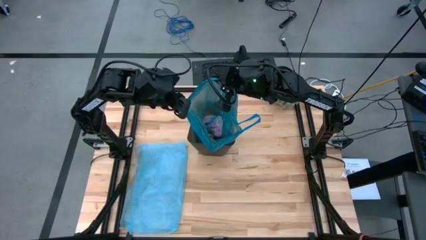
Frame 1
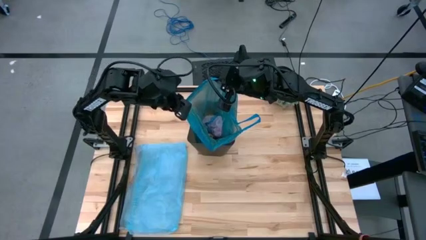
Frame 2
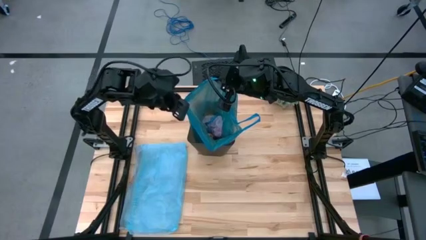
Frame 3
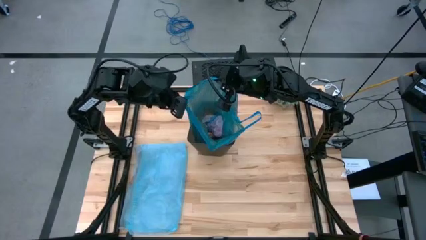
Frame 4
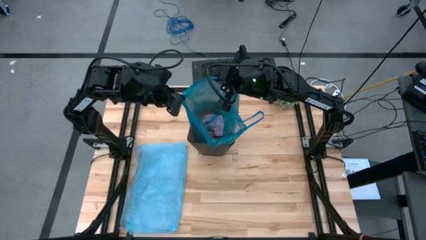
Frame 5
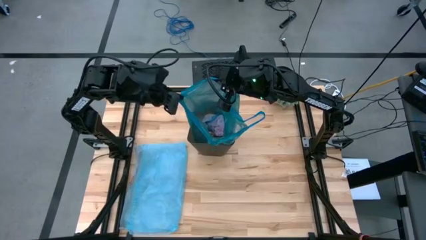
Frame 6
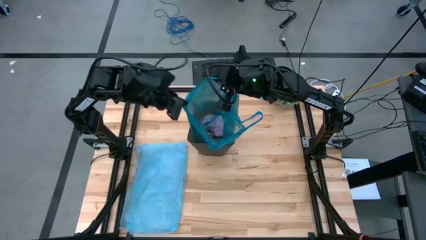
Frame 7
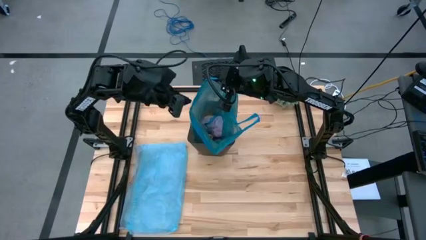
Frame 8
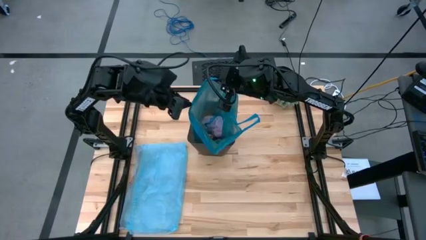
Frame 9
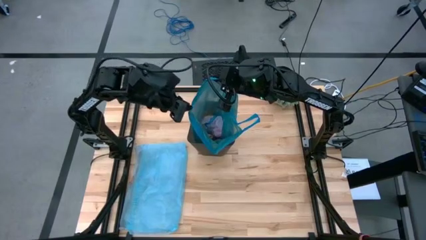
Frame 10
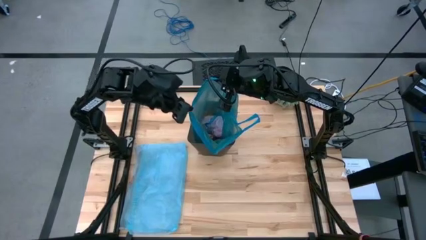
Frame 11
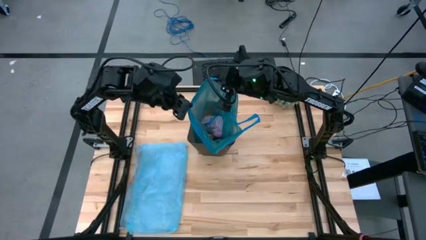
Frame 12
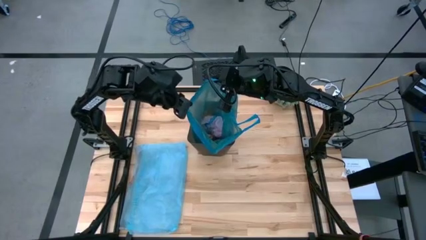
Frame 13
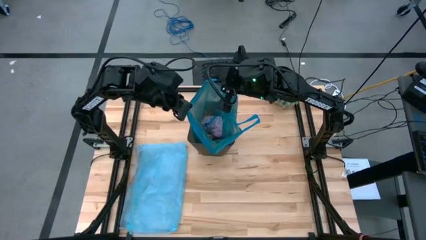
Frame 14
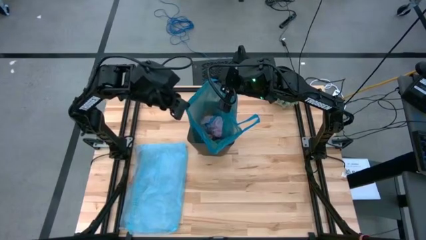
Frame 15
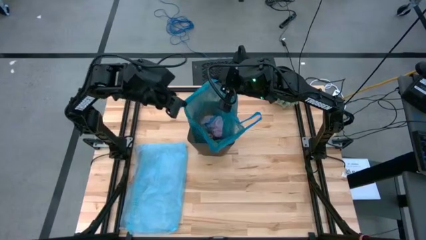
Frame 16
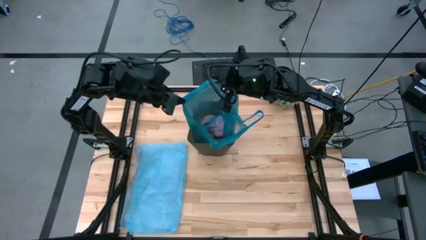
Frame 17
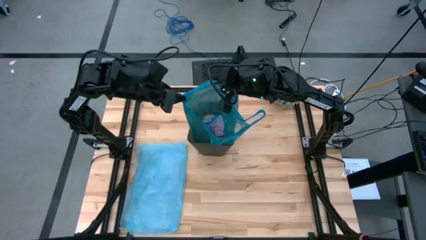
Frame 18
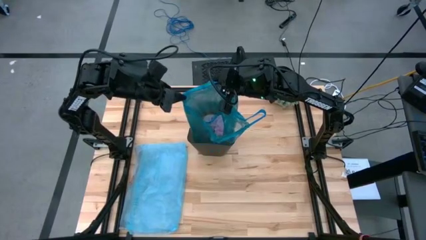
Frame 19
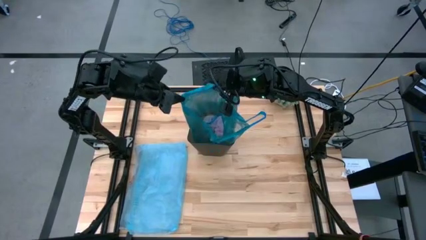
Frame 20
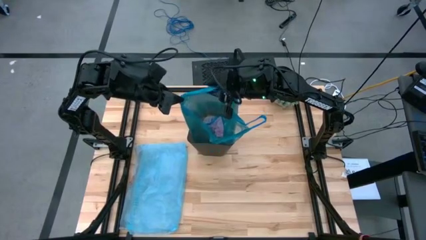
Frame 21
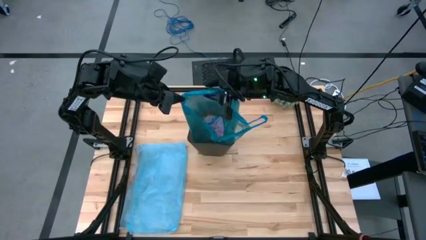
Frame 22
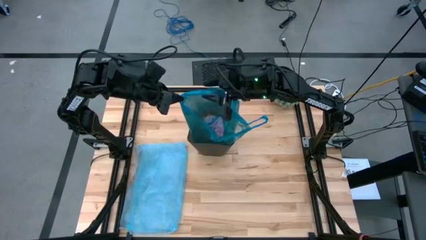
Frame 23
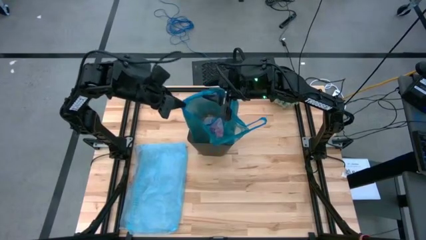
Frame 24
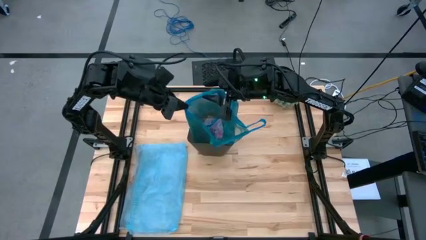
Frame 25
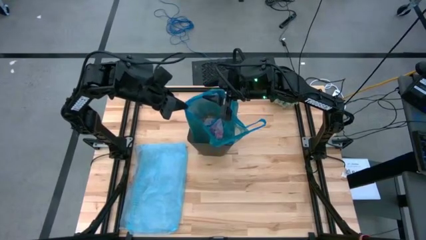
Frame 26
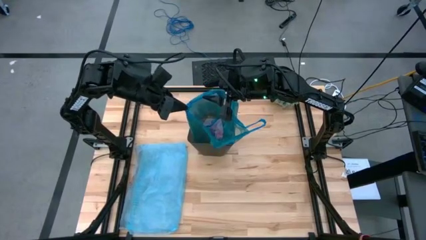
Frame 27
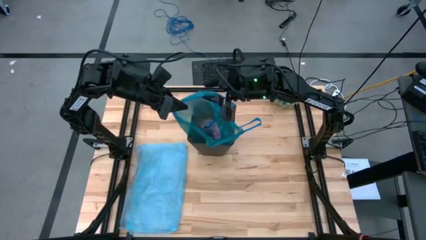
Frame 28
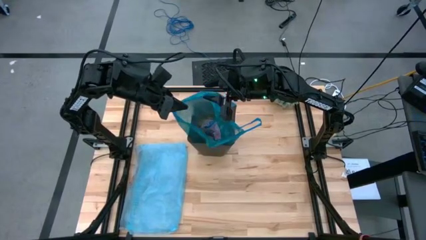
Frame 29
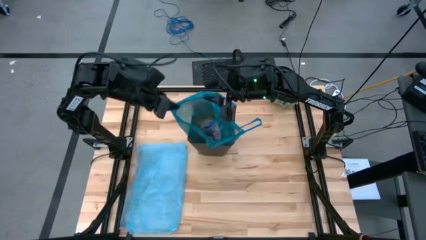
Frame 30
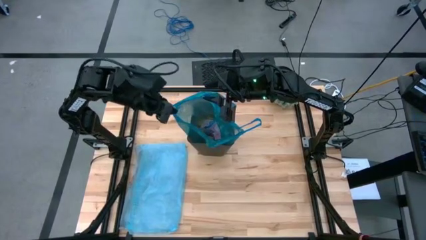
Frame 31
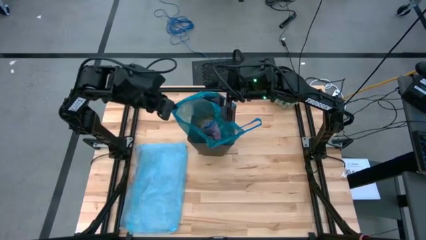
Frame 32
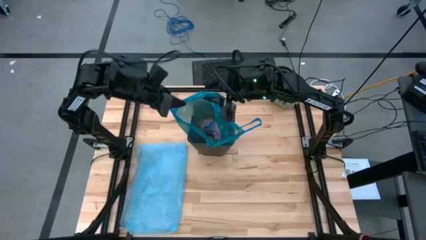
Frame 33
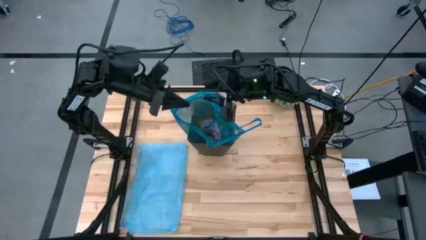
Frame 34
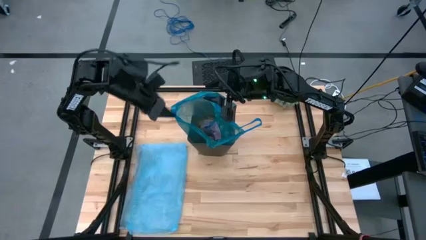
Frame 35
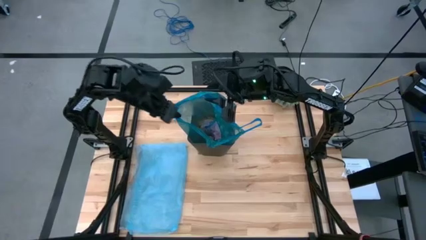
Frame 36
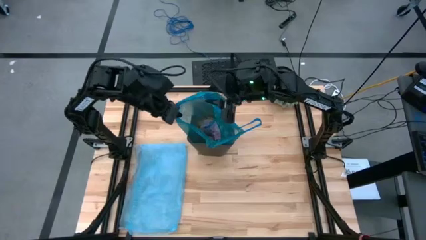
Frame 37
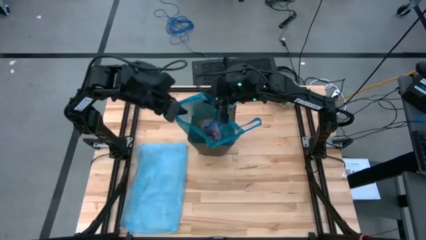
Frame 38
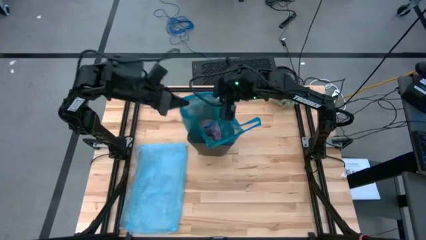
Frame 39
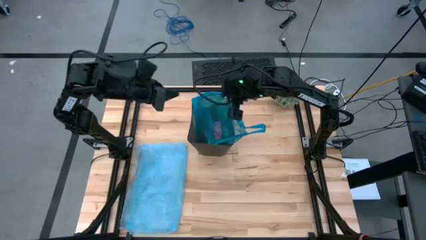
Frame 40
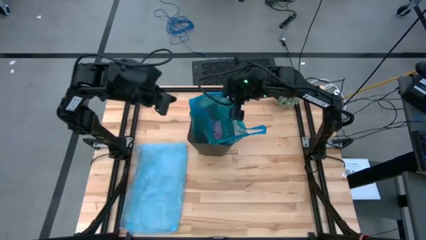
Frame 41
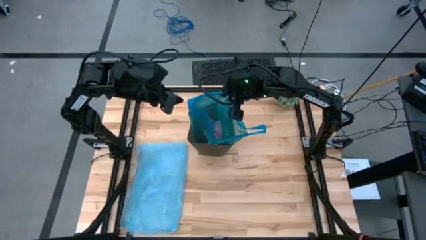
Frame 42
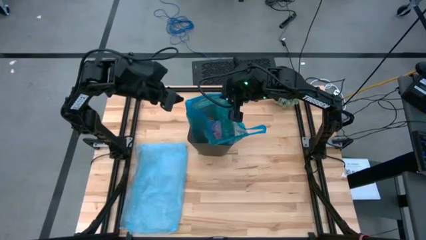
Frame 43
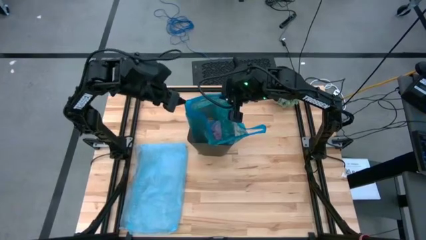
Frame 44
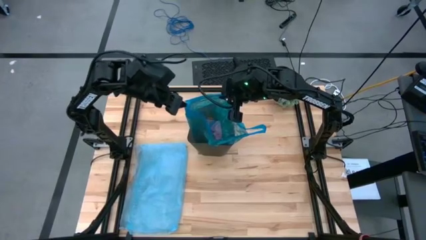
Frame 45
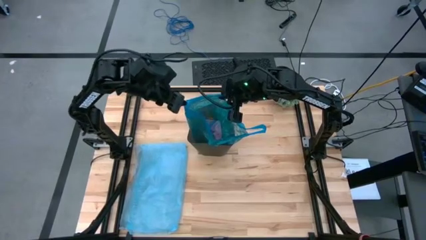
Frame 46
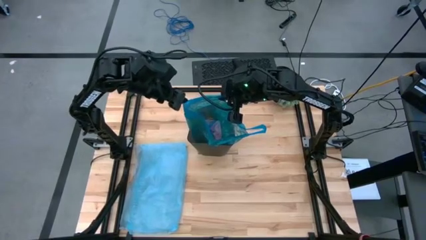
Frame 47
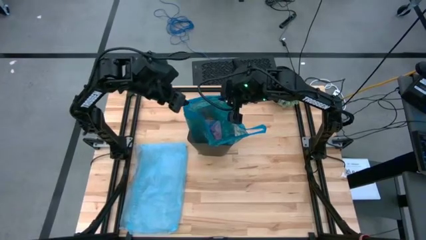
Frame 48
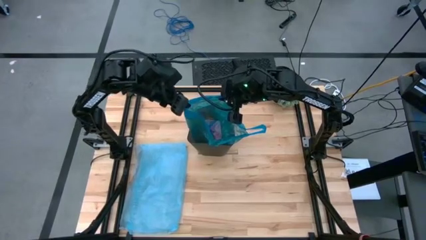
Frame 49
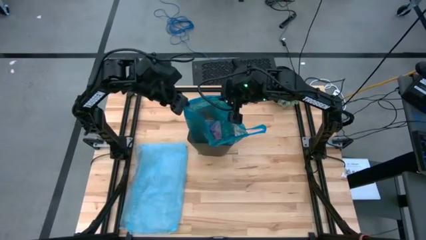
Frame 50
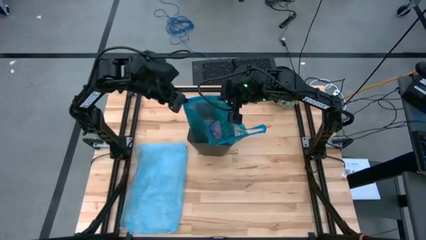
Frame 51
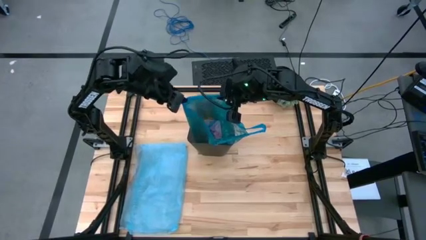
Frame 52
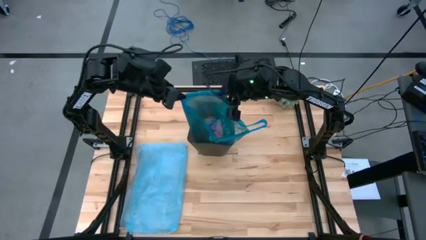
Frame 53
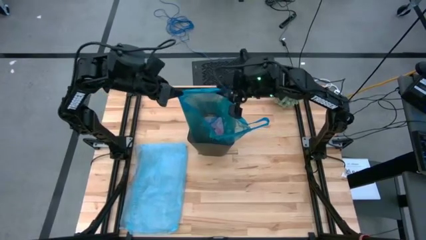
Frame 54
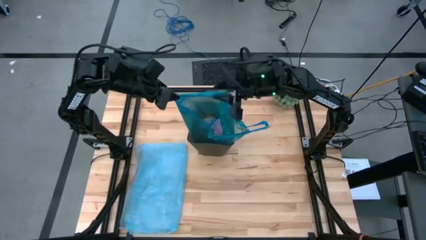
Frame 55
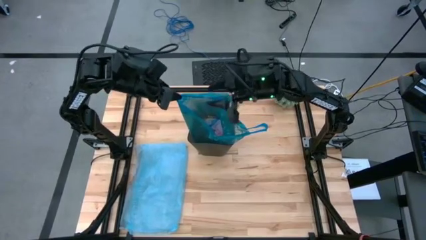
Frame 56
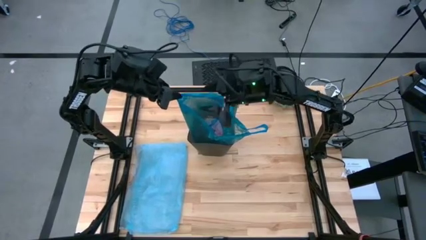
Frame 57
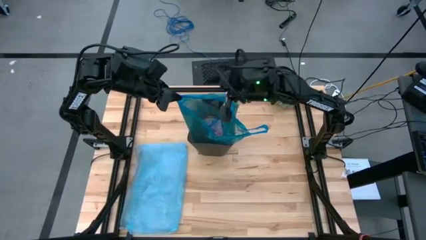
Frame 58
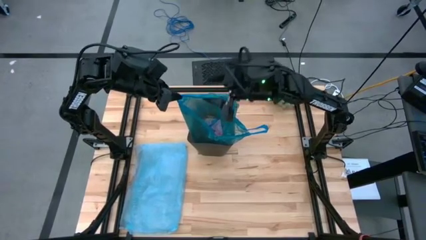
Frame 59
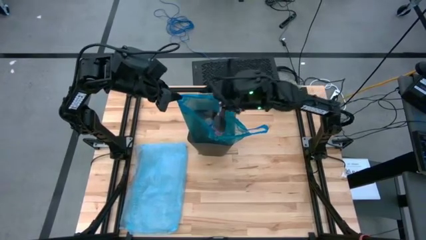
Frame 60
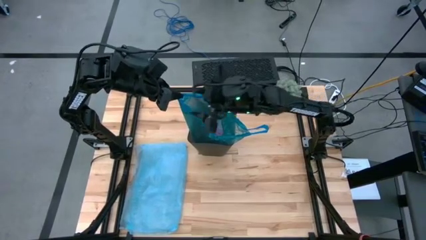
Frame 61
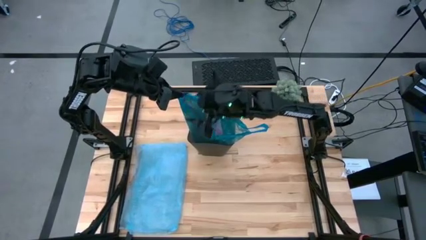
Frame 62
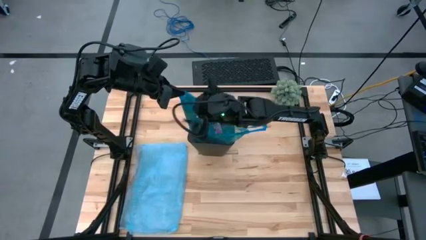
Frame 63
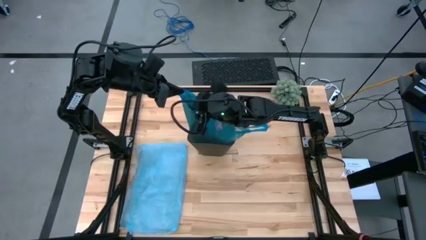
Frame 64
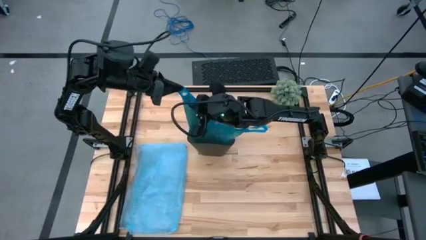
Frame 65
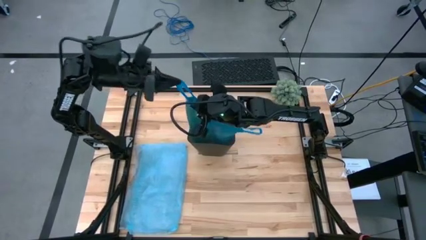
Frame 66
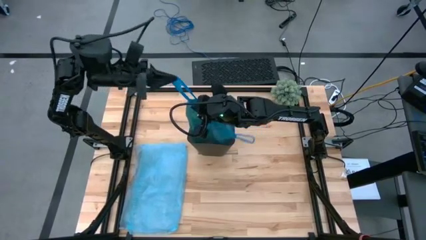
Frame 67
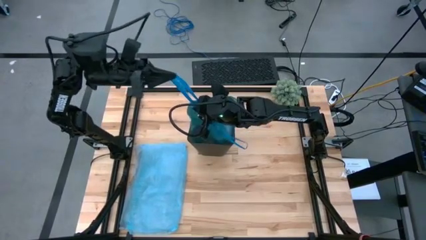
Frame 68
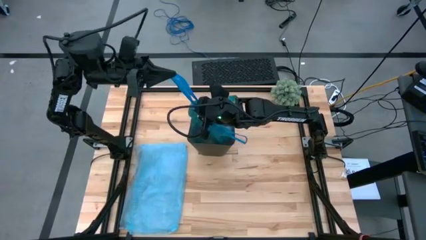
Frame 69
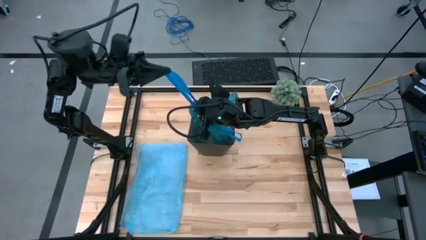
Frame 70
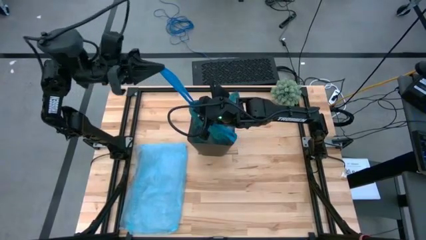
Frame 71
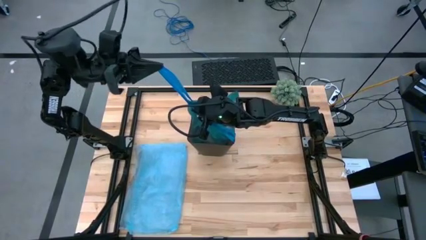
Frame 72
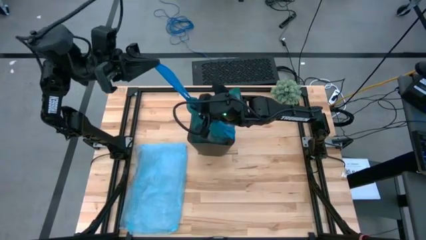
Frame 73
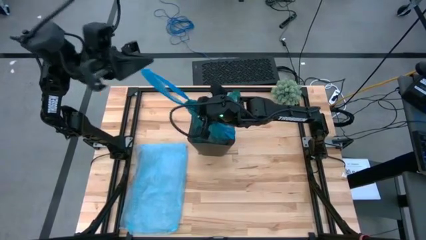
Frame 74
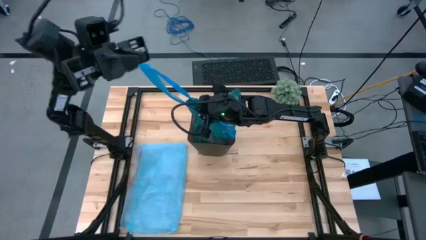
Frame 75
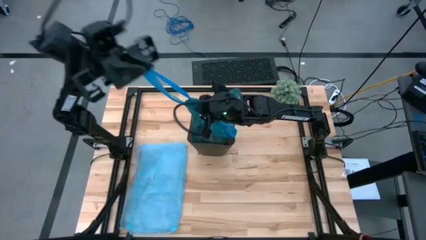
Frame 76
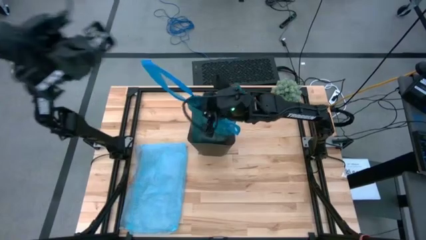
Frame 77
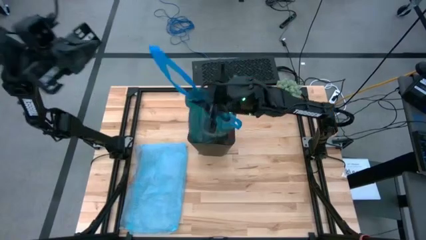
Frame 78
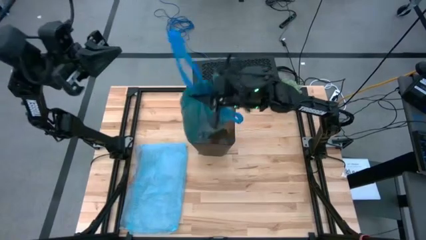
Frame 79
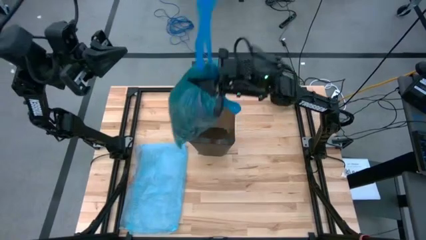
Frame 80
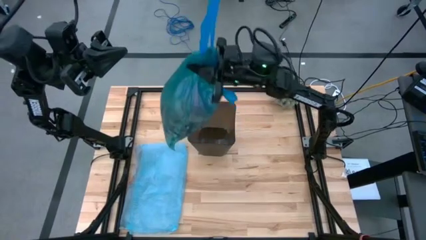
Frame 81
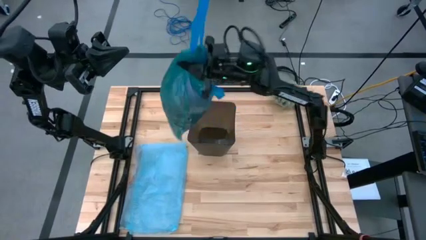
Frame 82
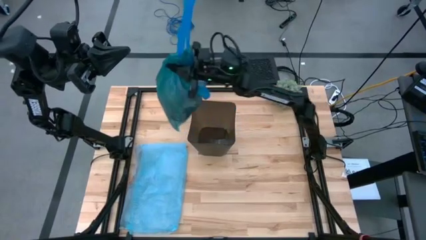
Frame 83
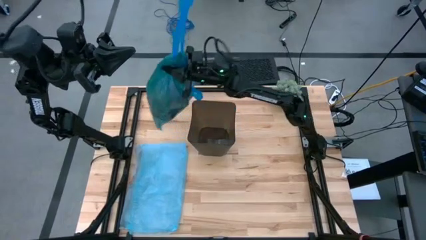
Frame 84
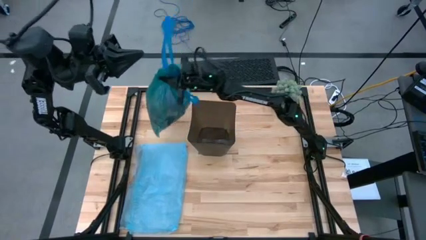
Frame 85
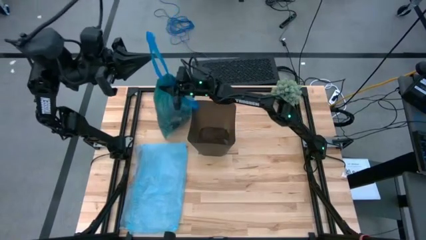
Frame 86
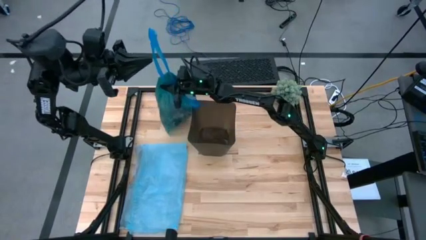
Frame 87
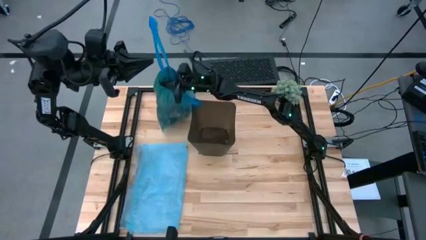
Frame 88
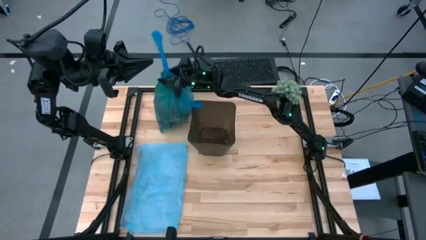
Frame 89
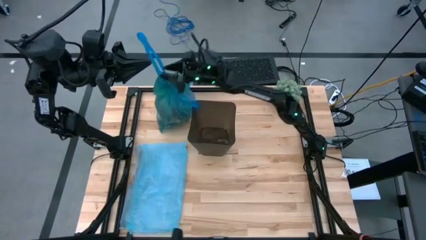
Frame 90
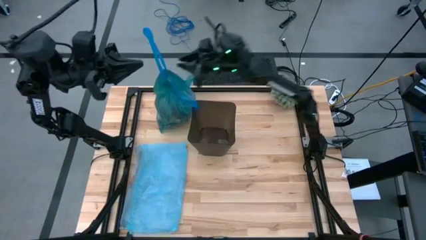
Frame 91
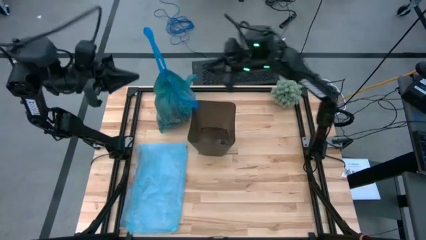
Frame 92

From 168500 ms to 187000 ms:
Task: place trash/remove bag and relplace
Remove the trash bag from the trash bin
